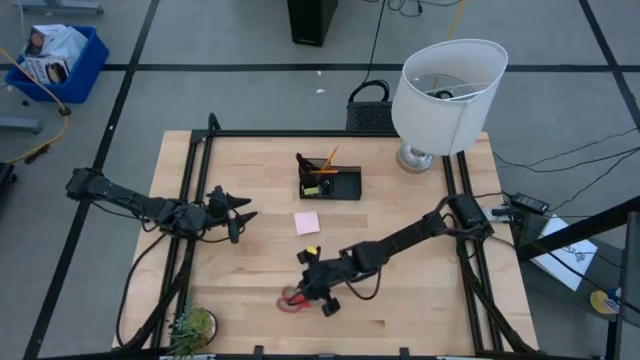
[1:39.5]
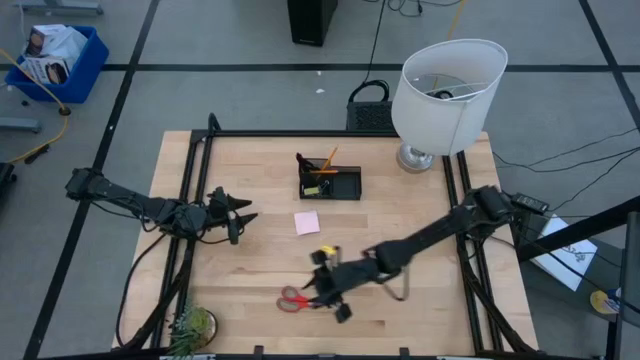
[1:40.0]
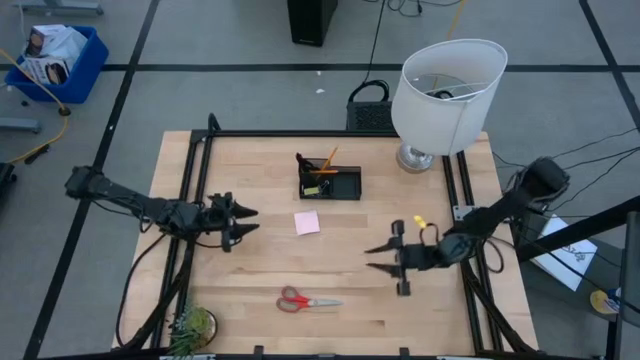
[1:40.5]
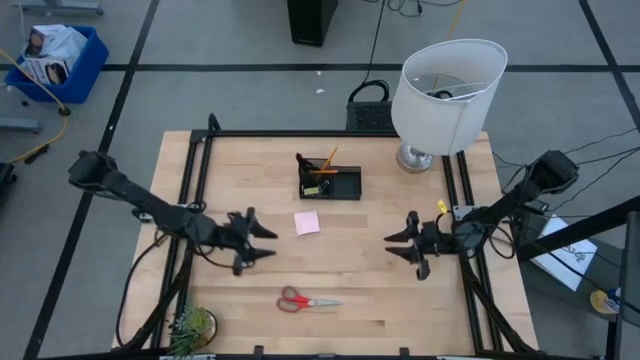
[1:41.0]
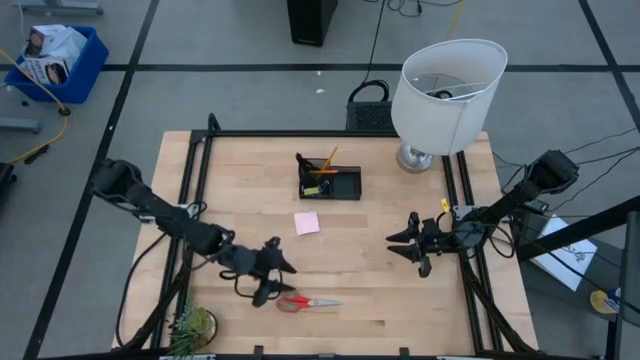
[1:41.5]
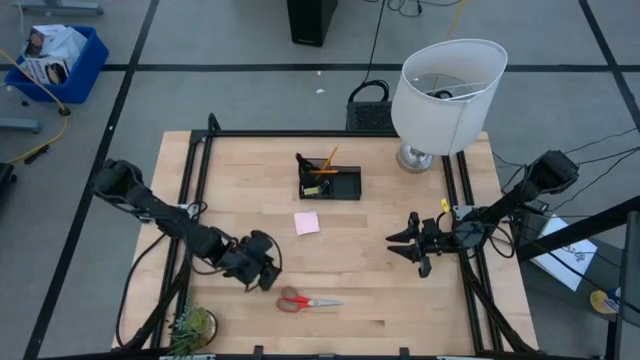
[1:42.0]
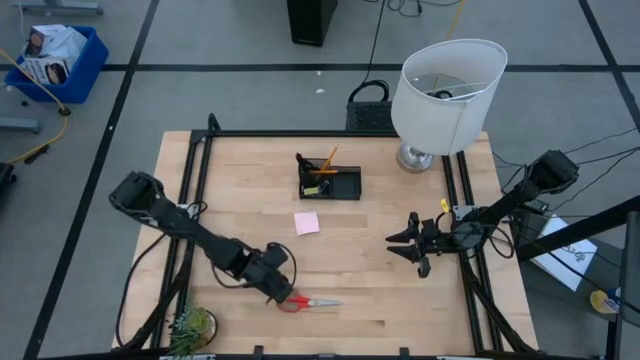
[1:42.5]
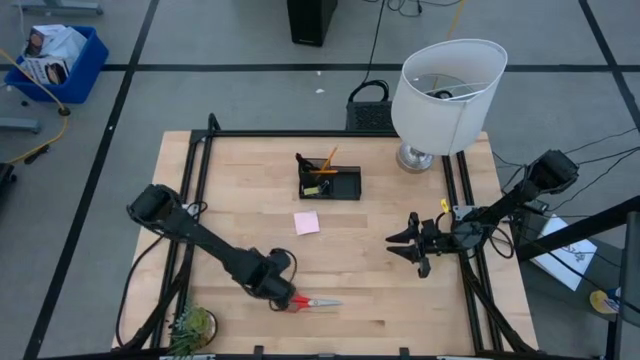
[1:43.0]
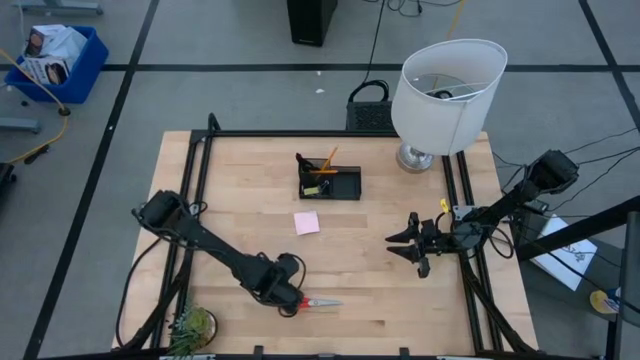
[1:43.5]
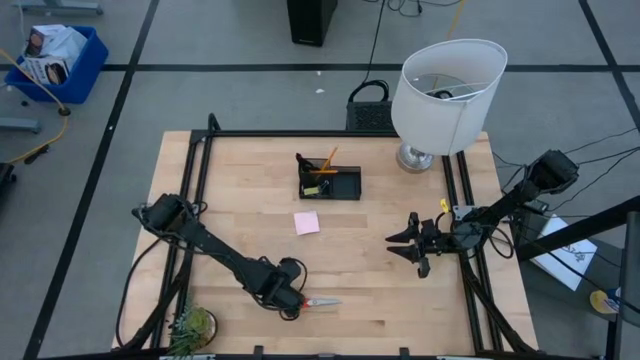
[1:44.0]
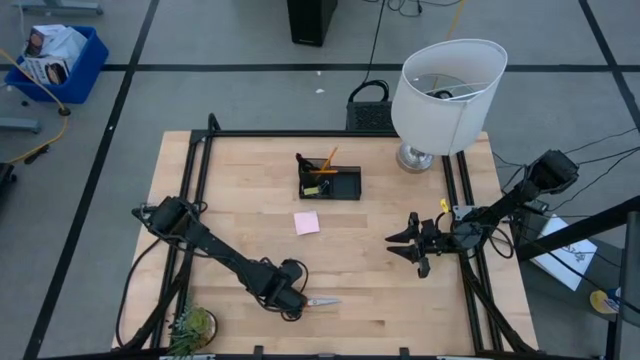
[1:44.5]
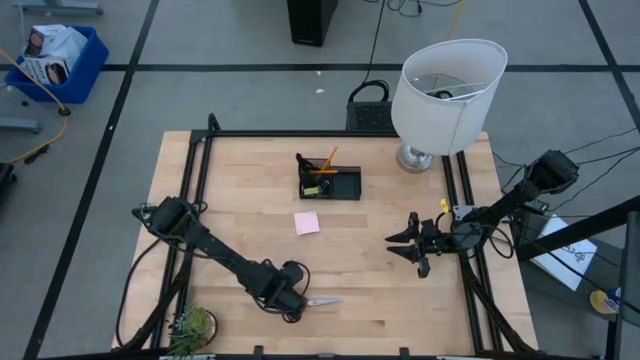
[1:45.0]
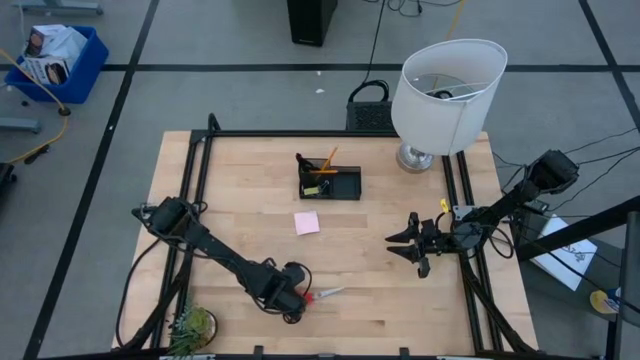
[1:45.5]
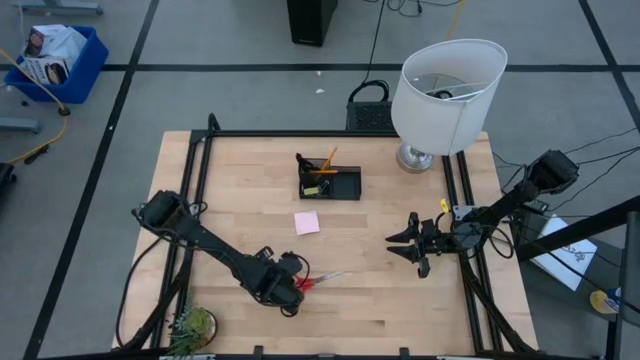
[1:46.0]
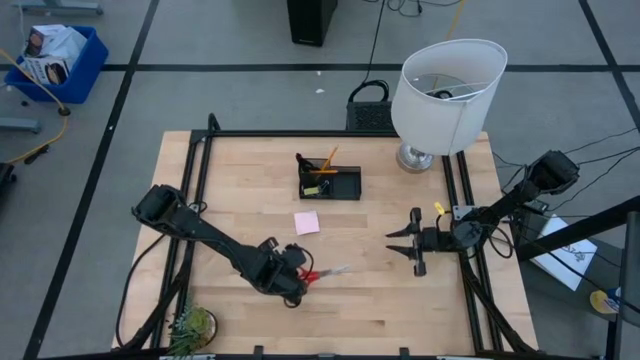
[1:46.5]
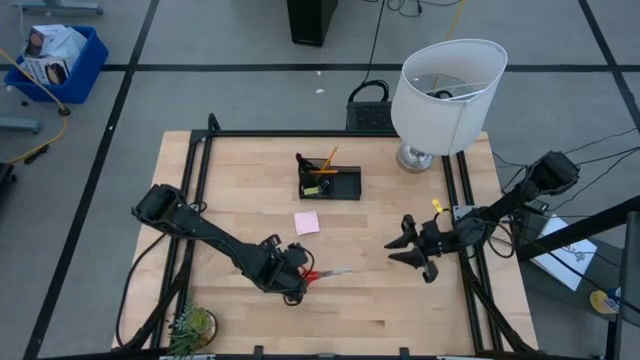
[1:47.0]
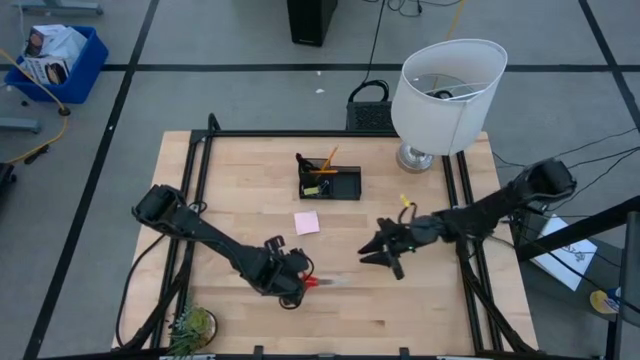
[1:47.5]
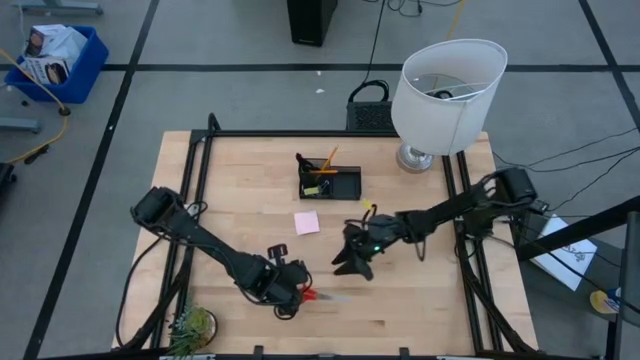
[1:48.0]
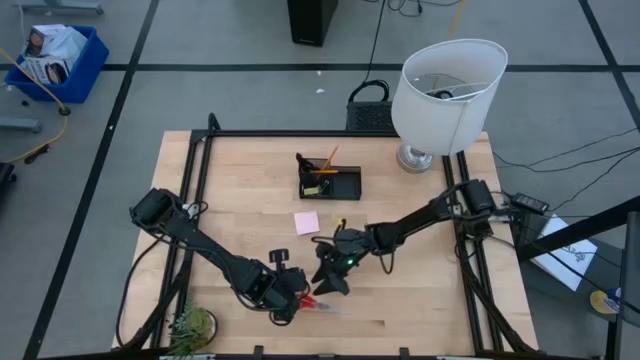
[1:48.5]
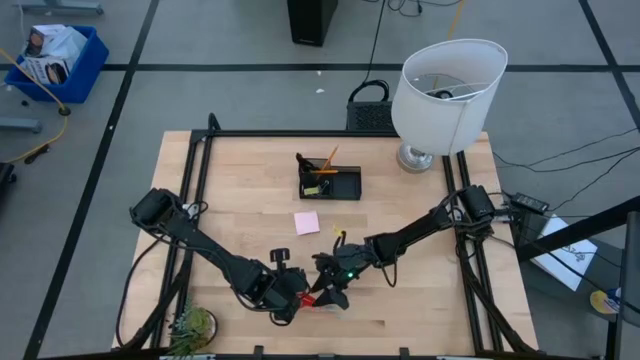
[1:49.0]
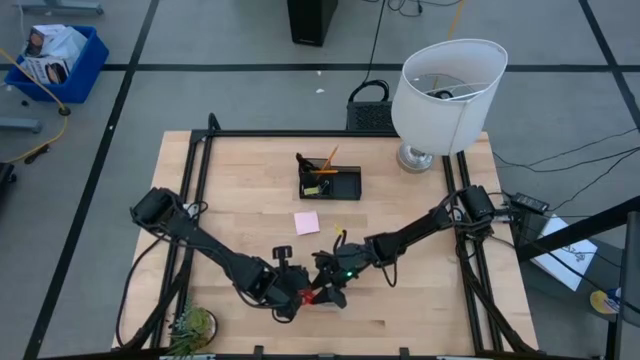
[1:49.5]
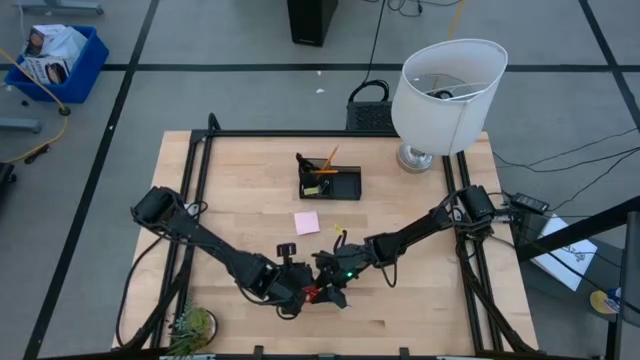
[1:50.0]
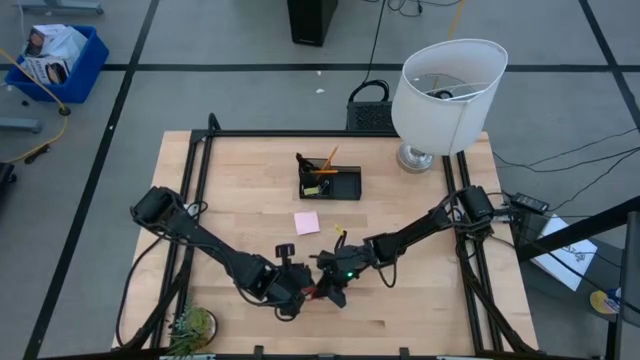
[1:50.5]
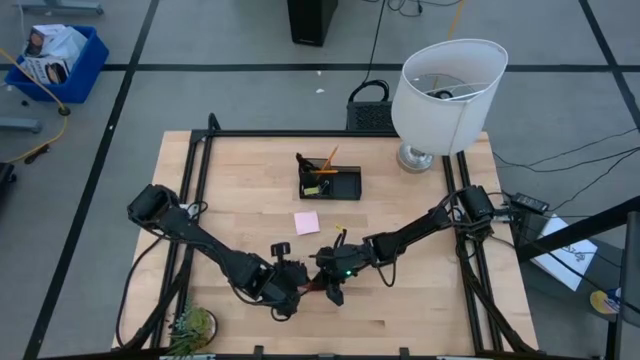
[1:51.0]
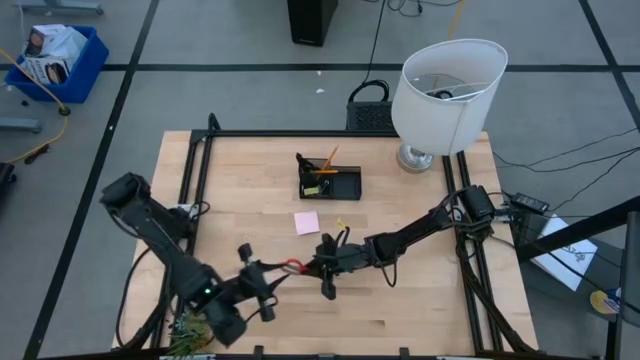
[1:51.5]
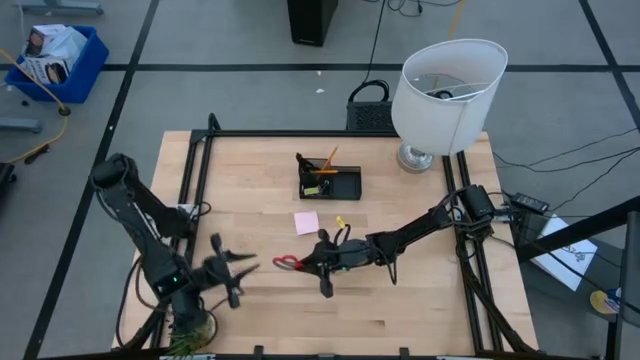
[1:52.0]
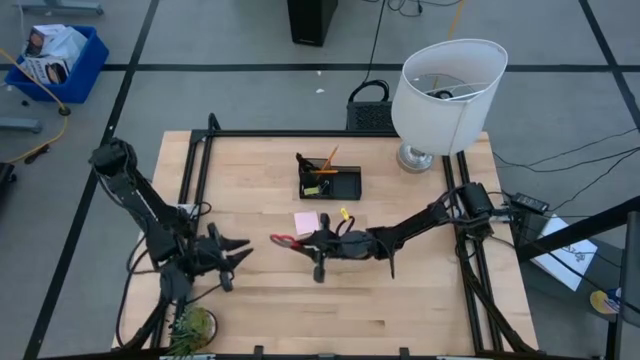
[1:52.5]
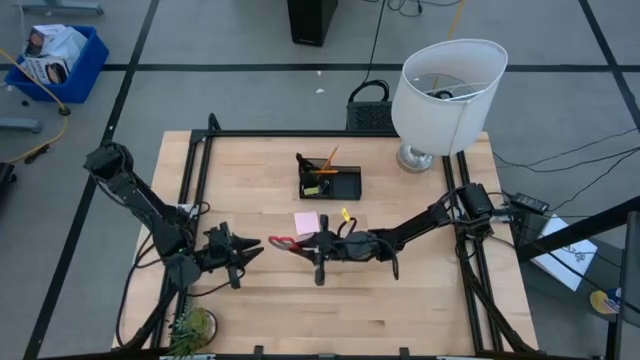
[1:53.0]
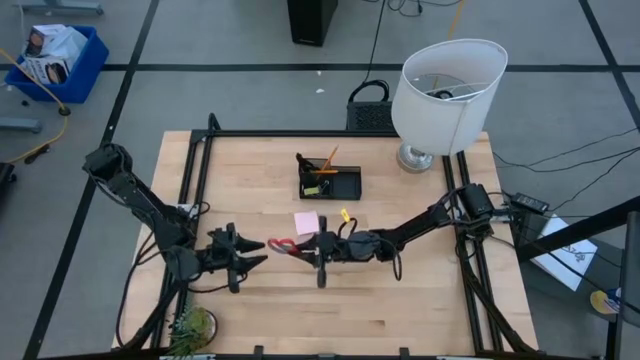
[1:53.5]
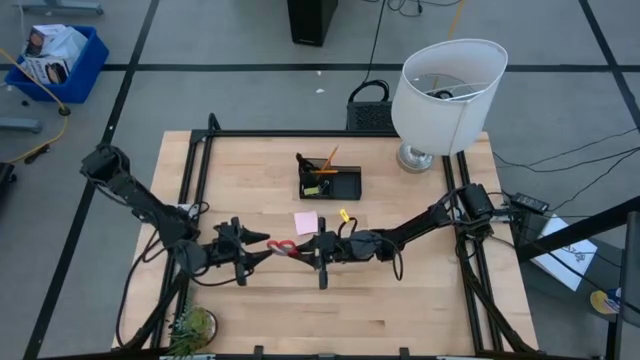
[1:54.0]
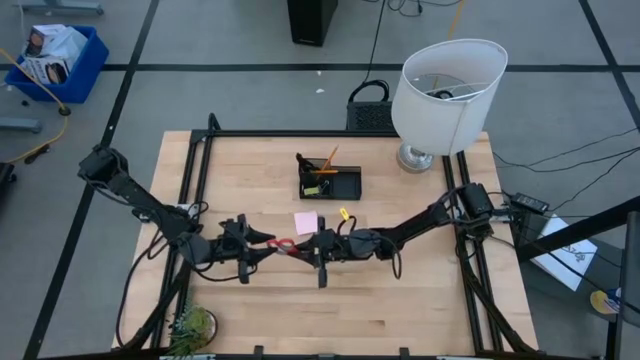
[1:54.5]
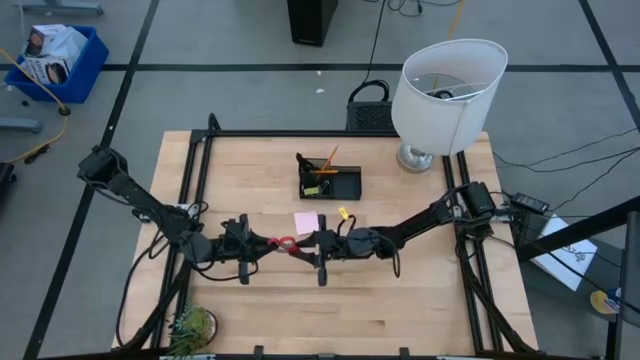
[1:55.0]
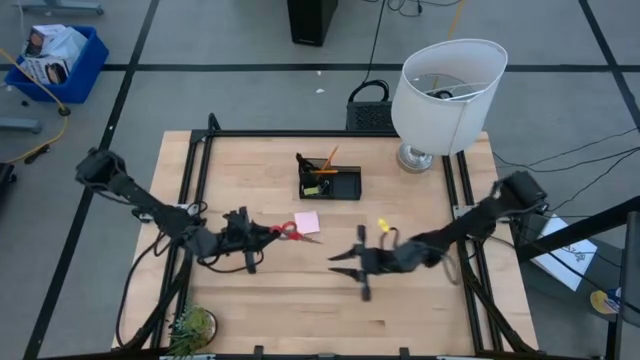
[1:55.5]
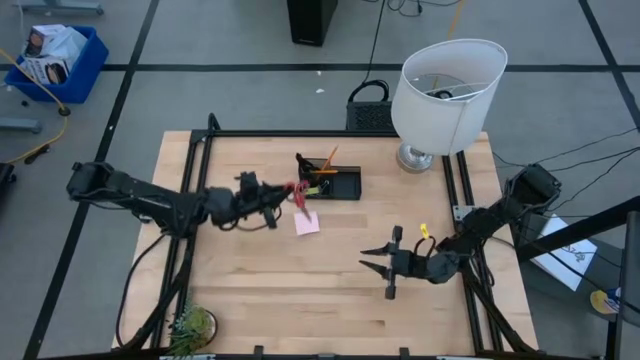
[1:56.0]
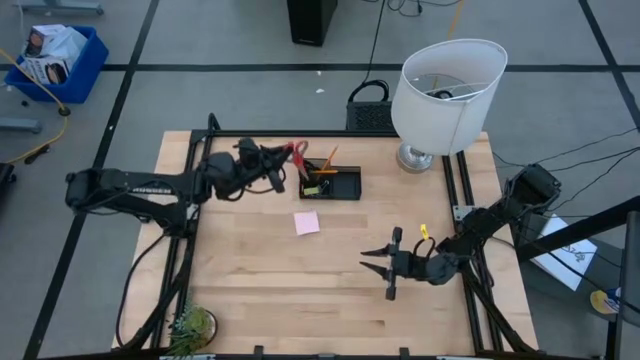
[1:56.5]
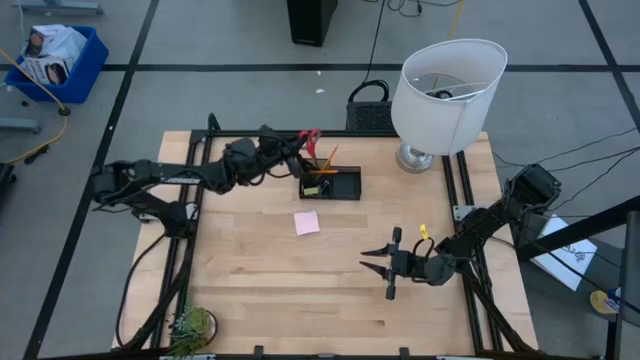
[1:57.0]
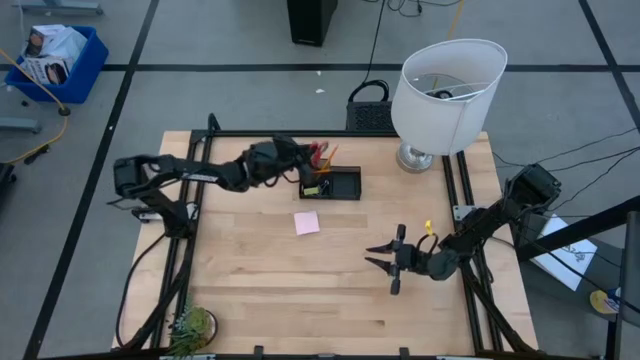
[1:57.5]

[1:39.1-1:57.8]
Task: Pick and place office supplies into organizer
Put the red scissors into the desk organizer
